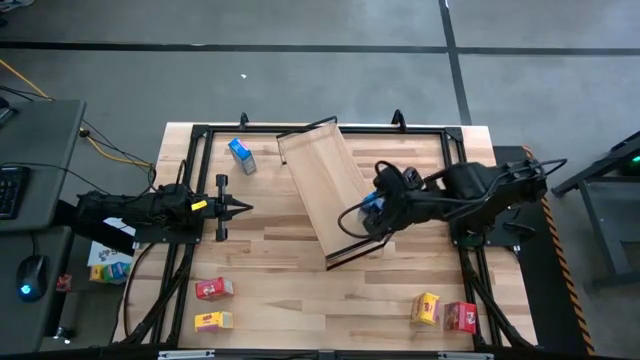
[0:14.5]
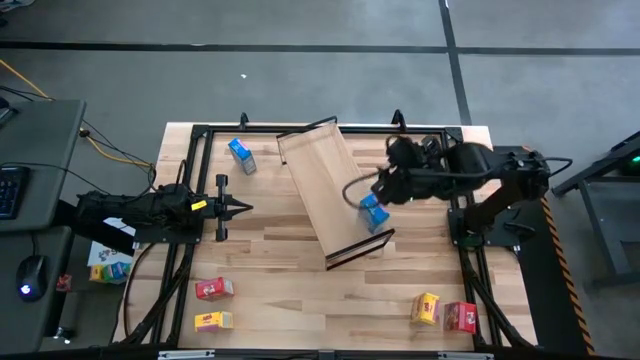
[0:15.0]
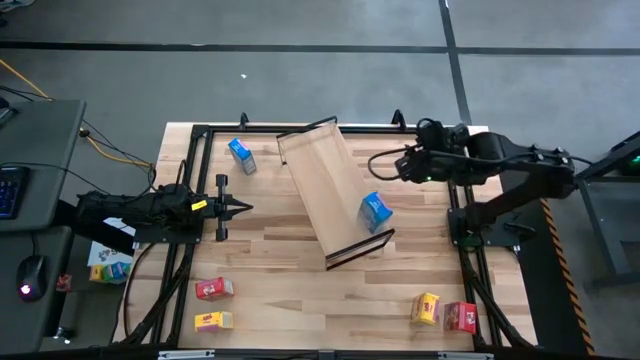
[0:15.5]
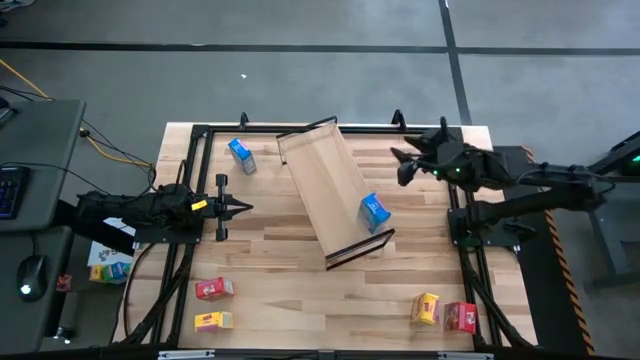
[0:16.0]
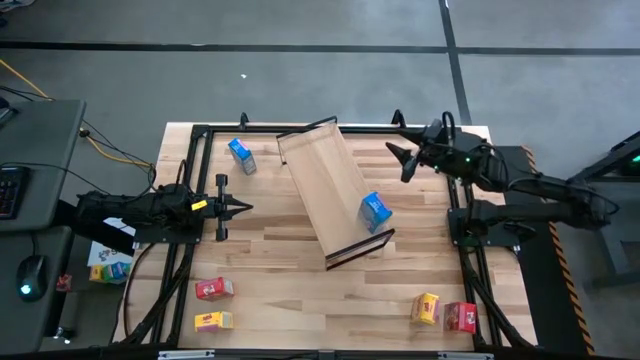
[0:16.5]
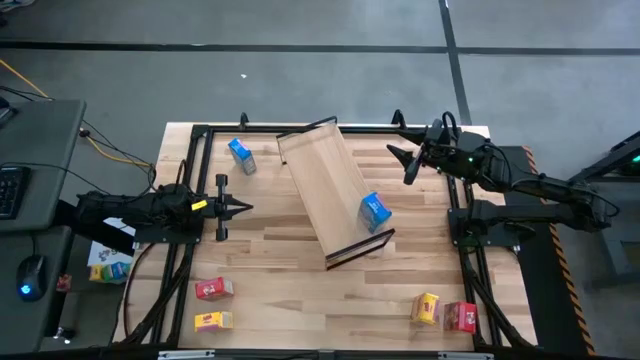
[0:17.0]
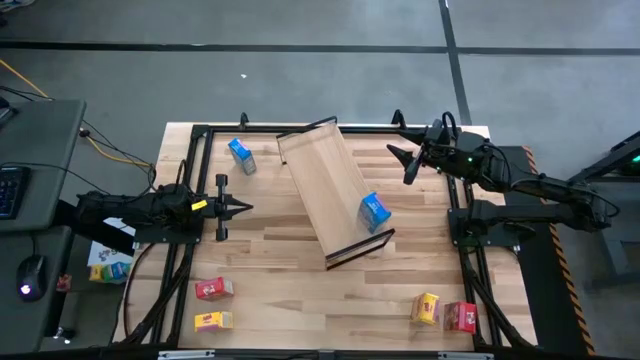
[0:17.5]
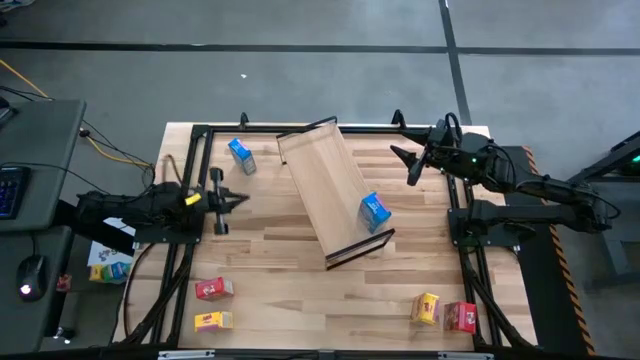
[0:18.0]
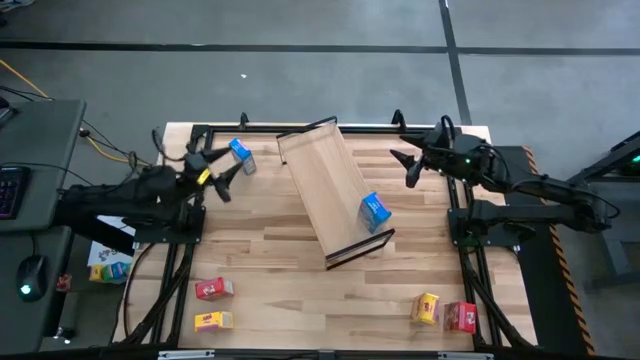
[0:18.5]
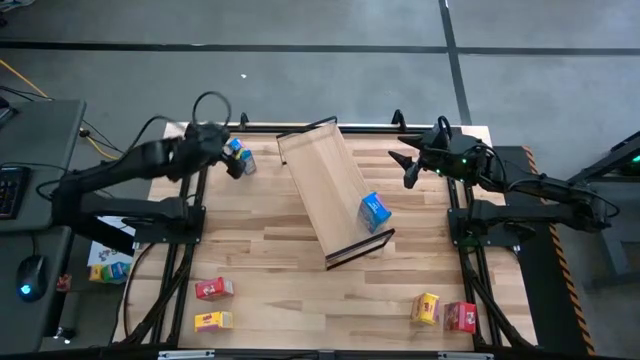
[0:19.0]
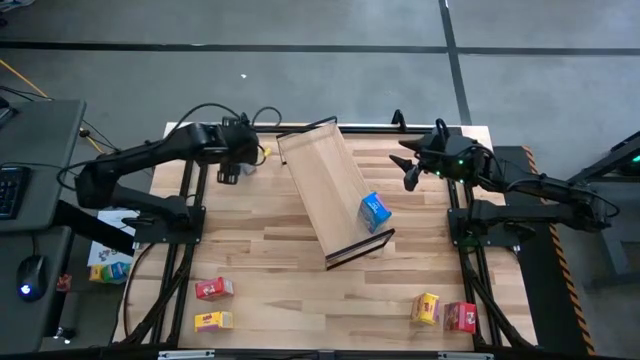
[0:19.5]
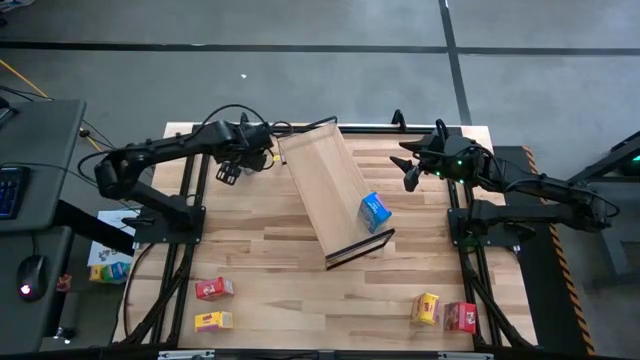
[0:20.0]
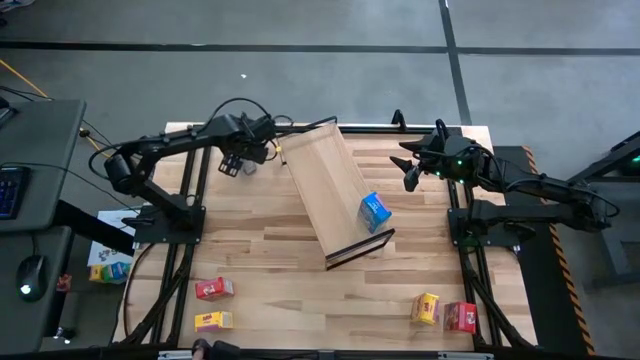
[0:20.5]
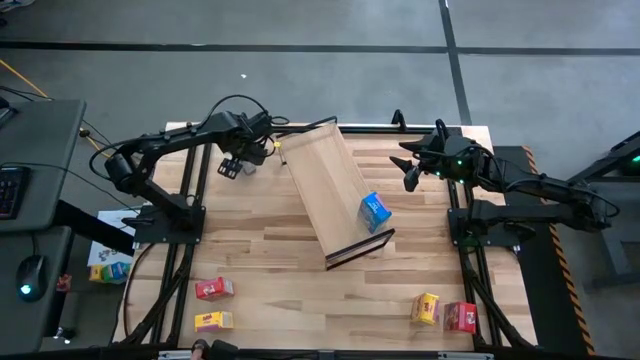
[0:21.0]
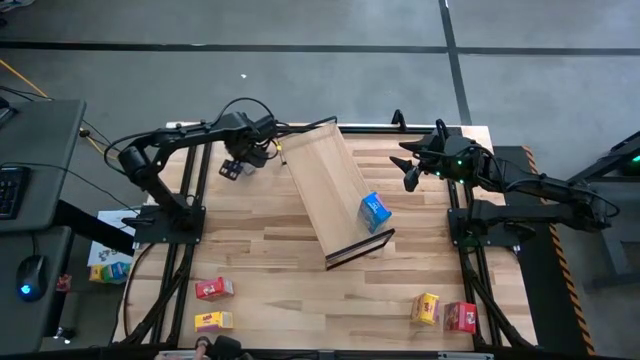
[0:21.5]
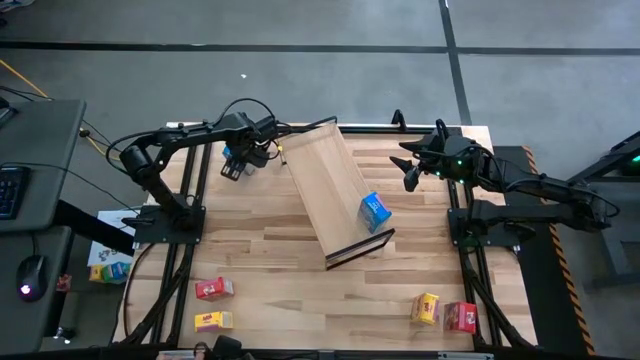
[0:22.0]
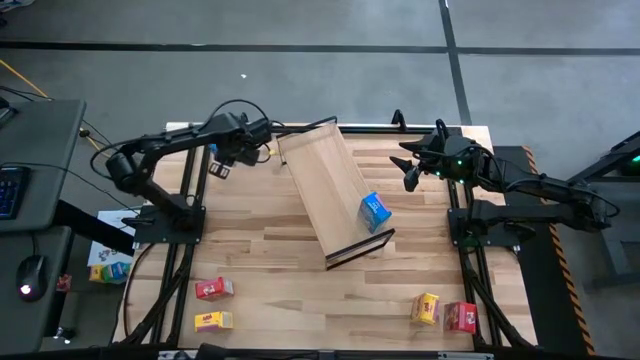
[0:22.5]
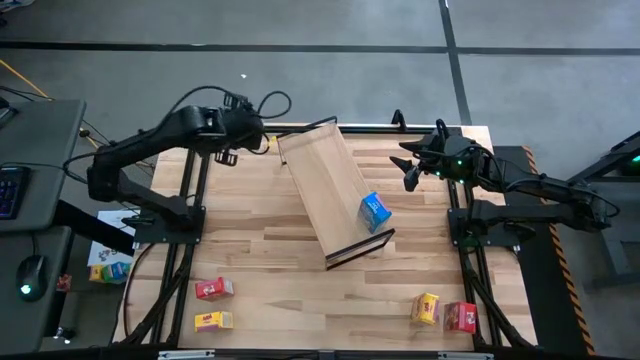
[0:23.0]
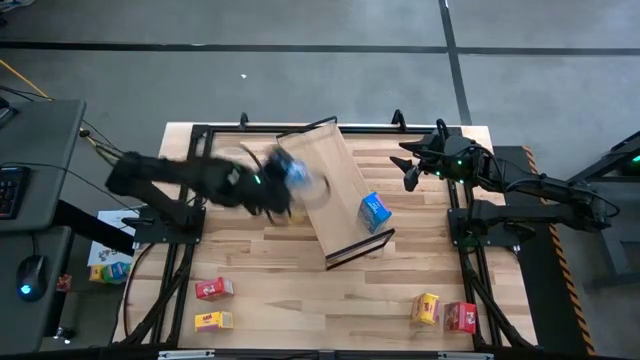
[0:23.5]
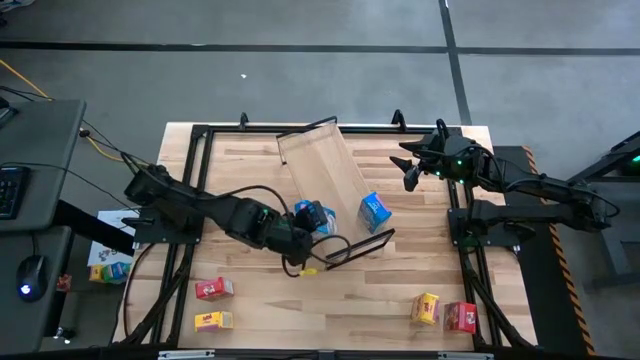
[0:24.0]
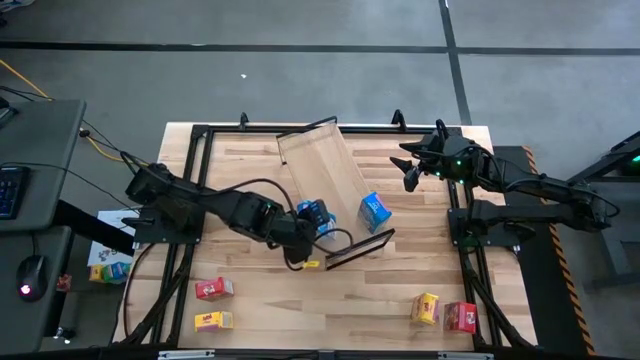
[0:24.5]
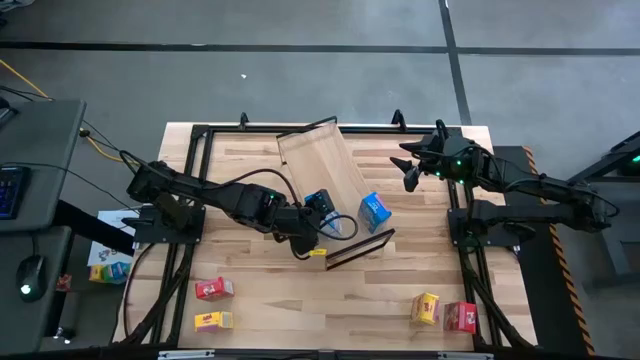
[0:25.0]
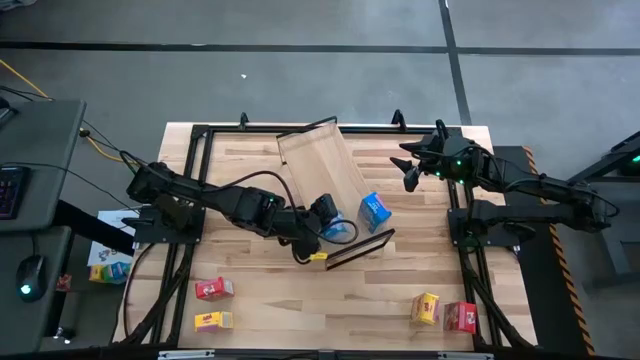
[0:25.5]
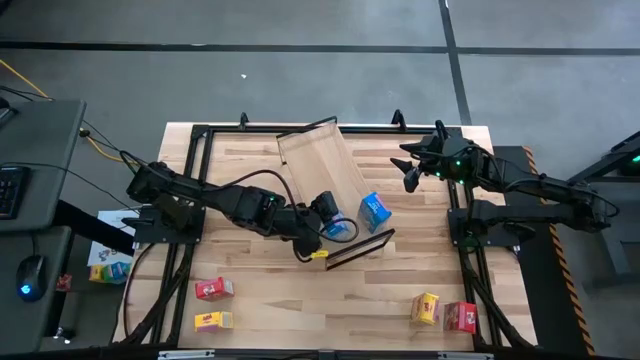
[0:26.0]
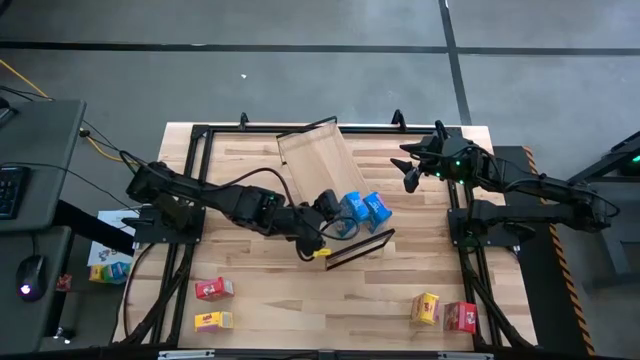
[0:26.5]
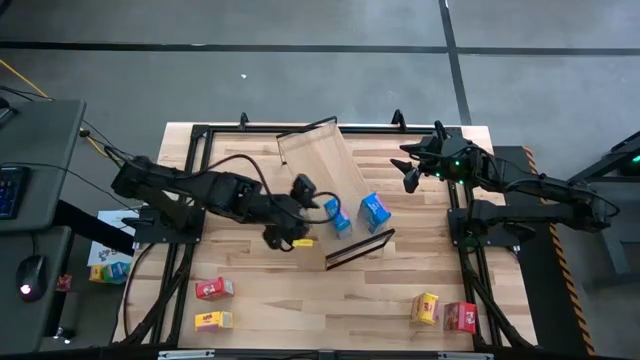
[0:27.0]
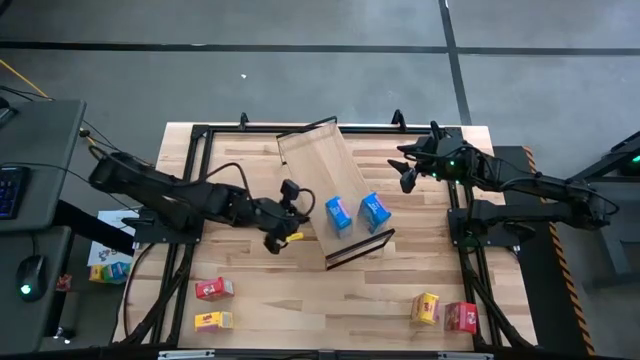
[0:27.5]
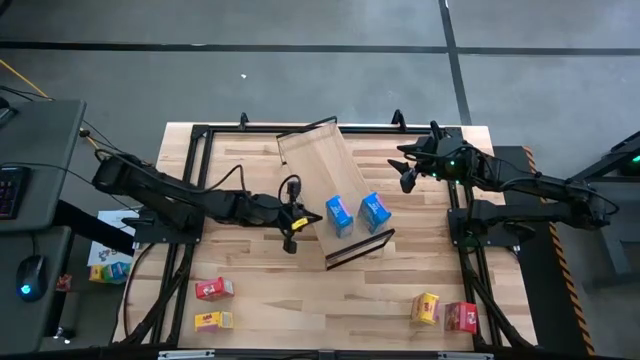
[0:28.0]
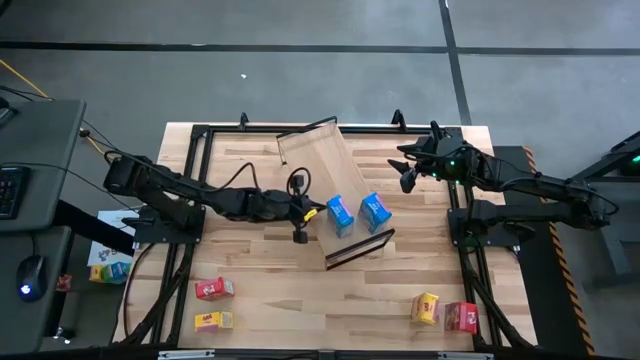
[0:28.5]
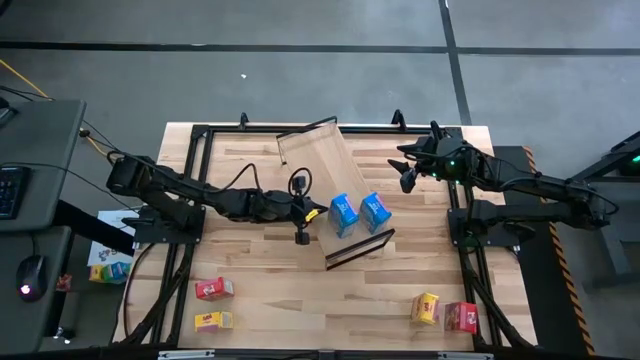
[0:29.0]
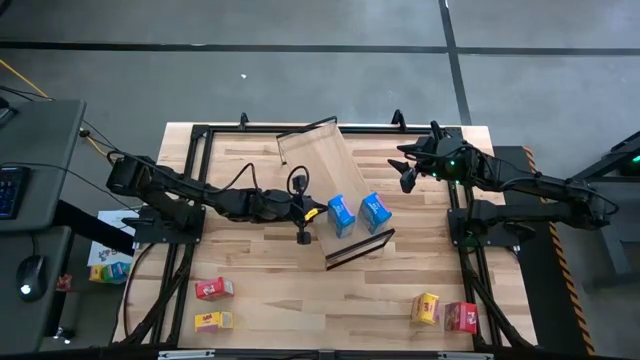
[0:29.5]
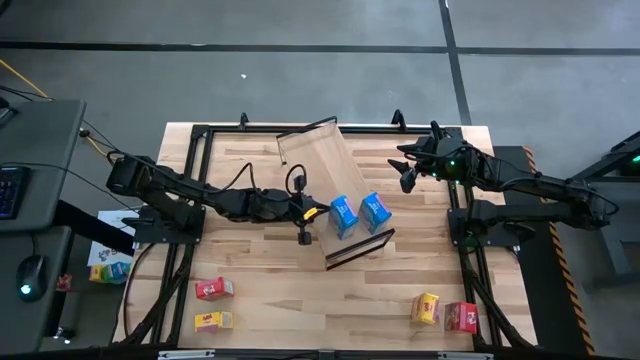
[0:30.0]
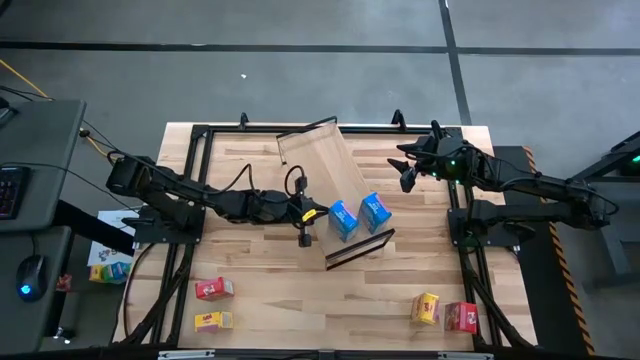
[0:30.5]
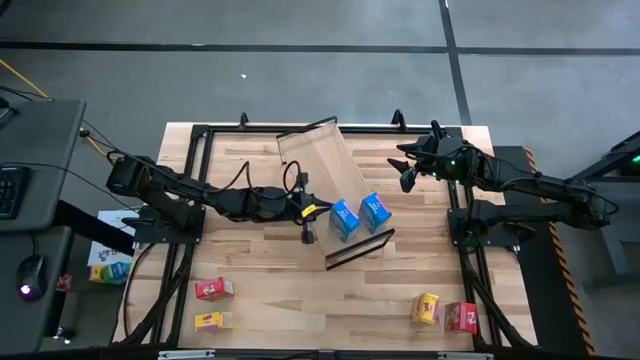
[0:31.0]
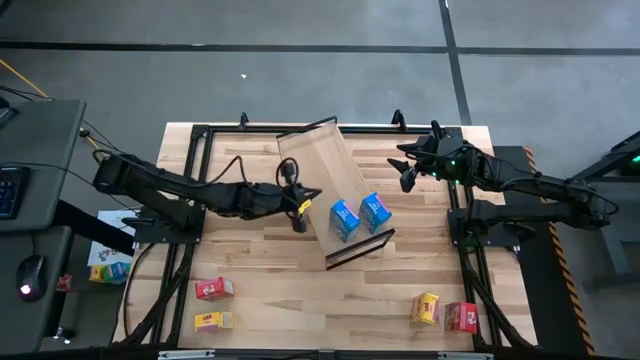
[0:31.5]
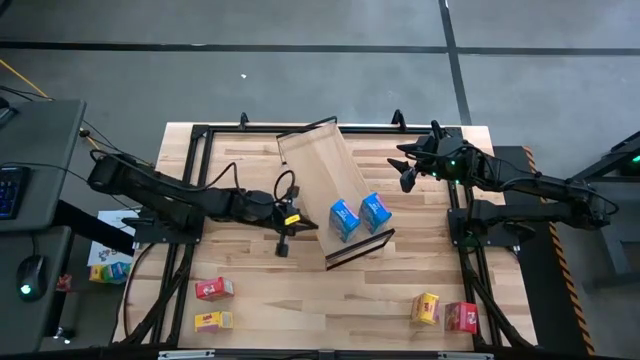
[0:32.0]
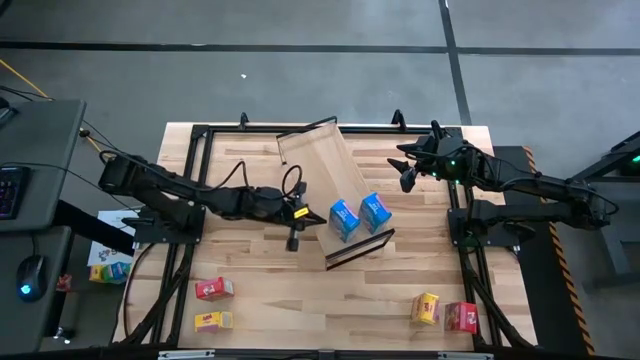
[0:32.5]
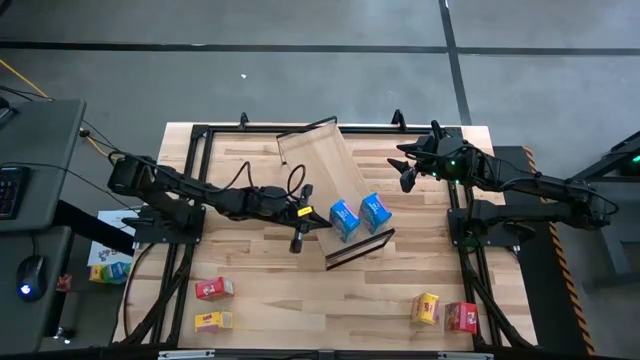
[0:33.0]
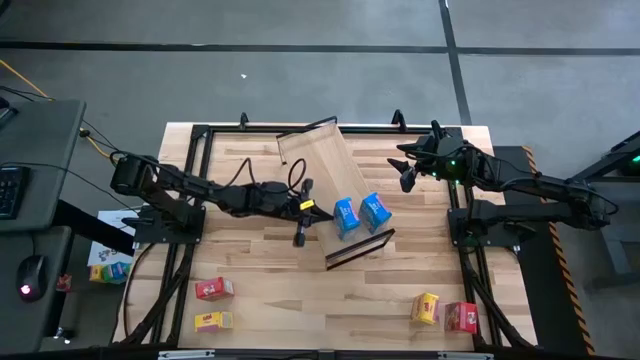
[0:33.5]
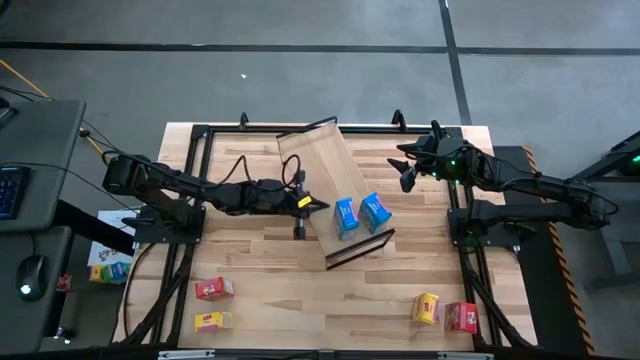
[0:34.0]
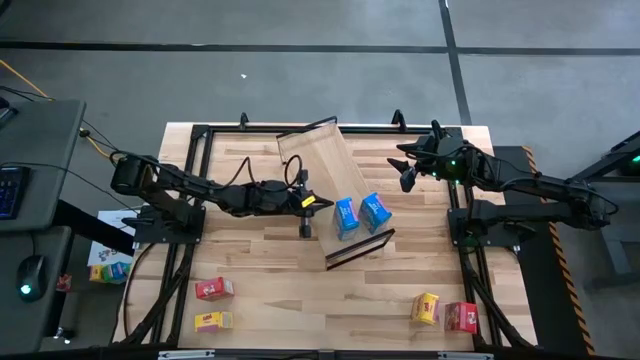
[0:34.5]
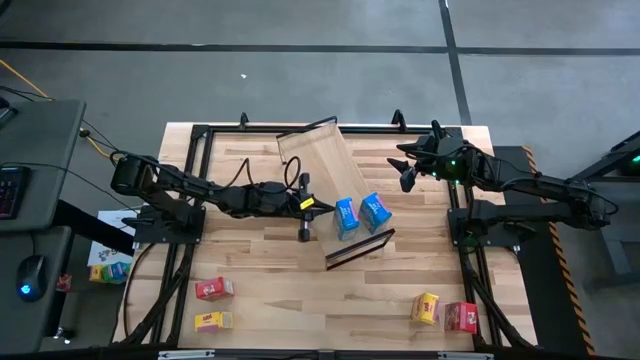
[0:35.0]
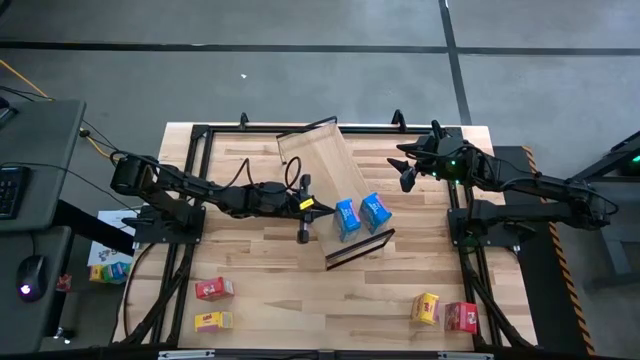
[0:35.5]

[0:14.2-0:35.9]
Task: Stack cereal on shelf
Put the blue cereal box on the shelf aligned with the other blue cereal box
